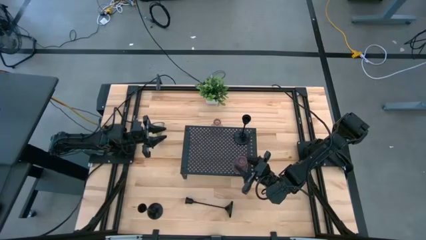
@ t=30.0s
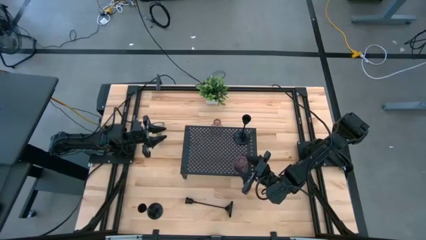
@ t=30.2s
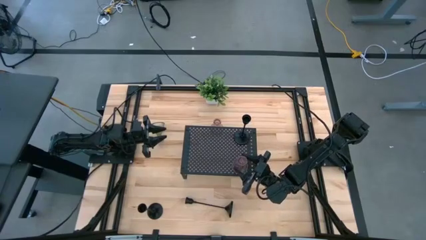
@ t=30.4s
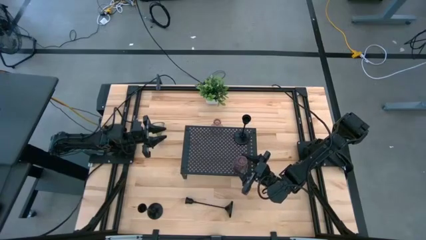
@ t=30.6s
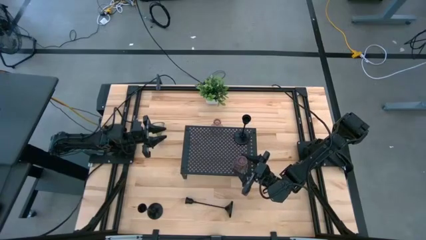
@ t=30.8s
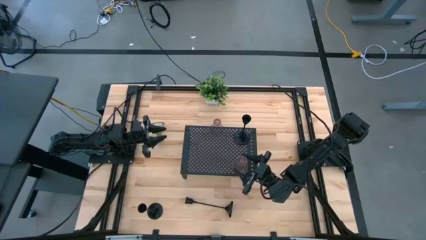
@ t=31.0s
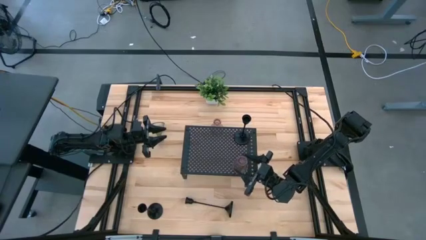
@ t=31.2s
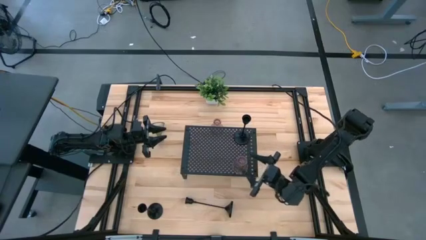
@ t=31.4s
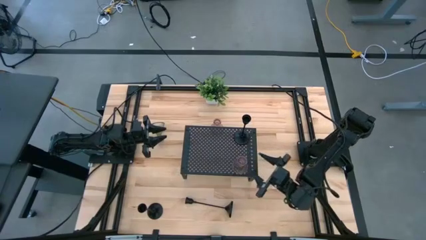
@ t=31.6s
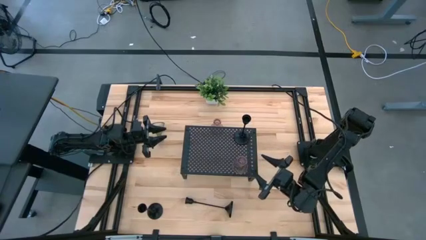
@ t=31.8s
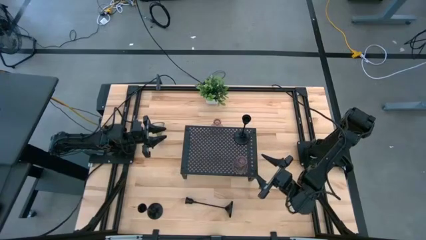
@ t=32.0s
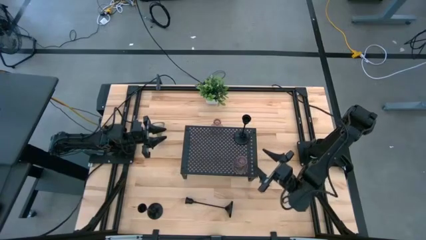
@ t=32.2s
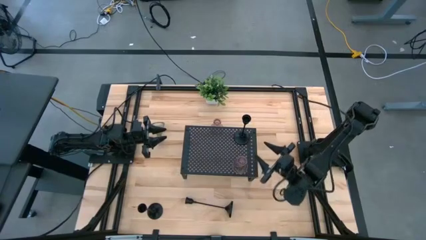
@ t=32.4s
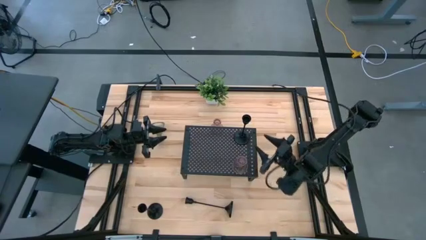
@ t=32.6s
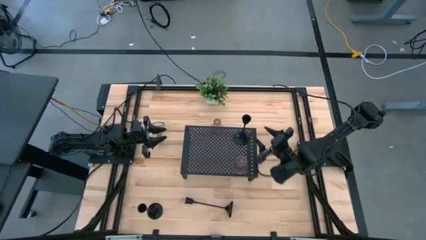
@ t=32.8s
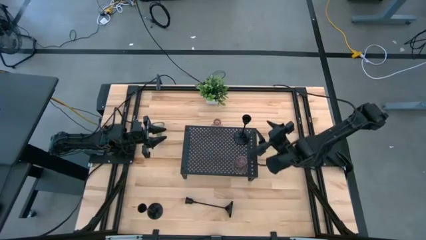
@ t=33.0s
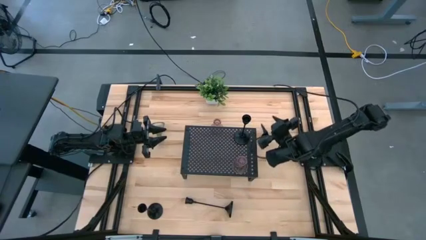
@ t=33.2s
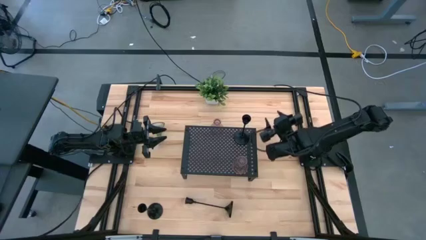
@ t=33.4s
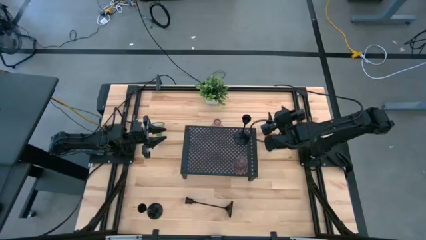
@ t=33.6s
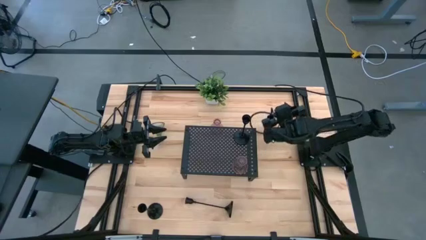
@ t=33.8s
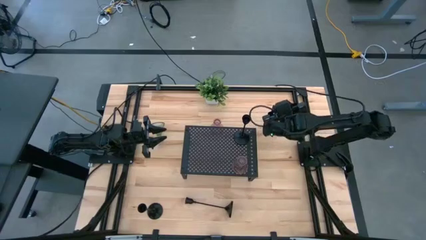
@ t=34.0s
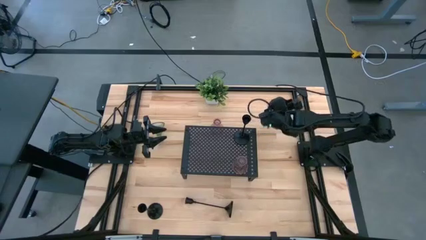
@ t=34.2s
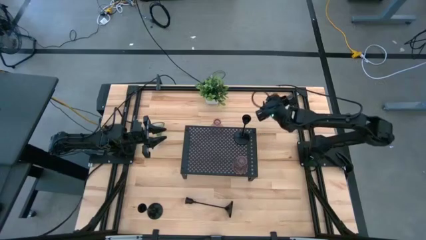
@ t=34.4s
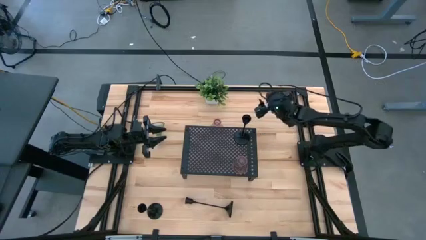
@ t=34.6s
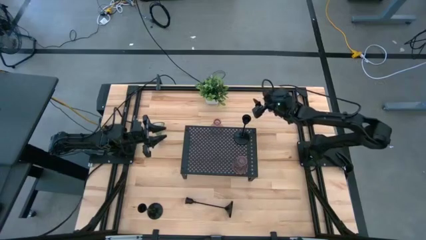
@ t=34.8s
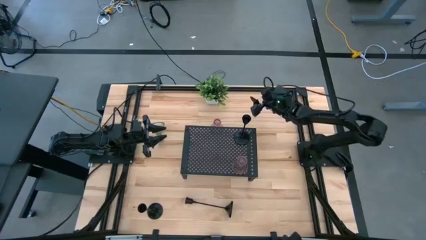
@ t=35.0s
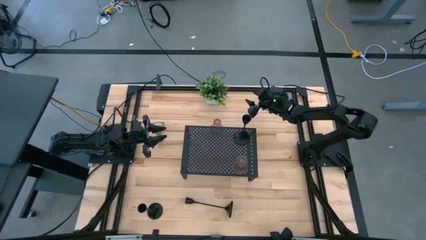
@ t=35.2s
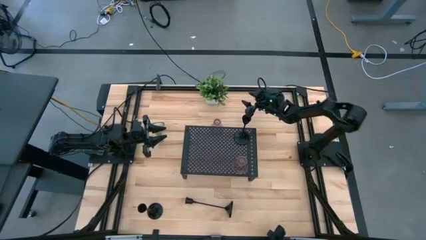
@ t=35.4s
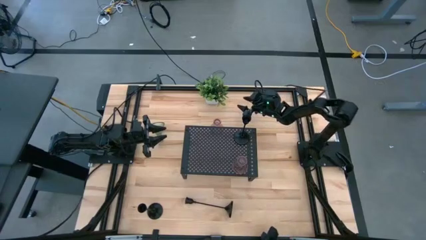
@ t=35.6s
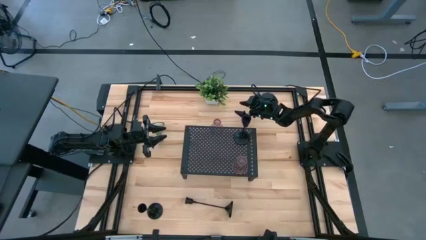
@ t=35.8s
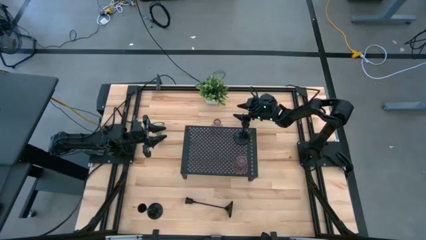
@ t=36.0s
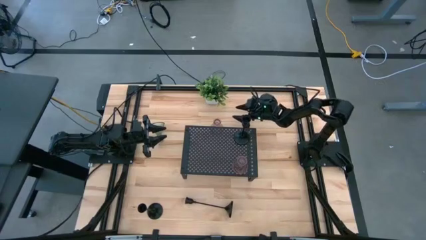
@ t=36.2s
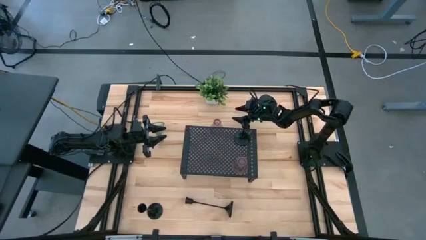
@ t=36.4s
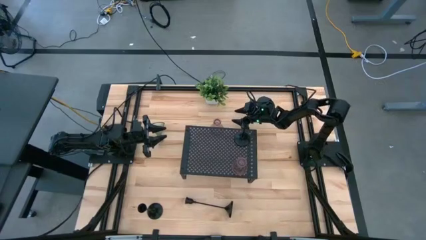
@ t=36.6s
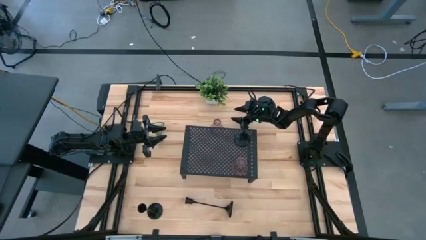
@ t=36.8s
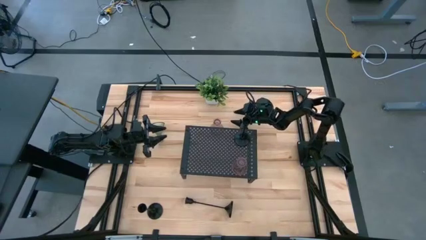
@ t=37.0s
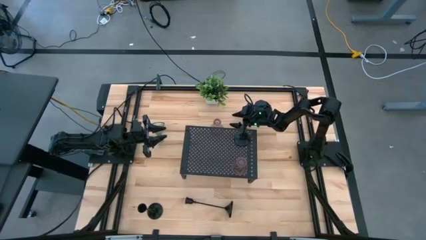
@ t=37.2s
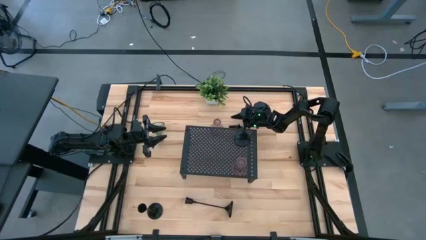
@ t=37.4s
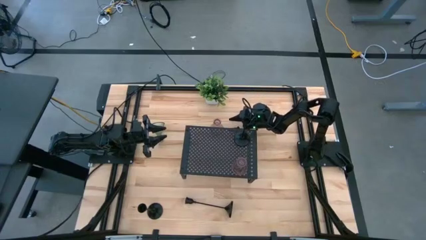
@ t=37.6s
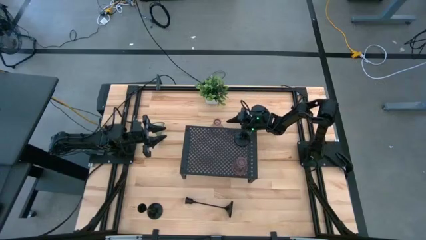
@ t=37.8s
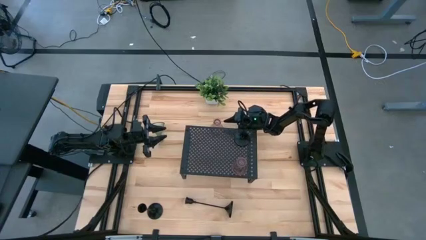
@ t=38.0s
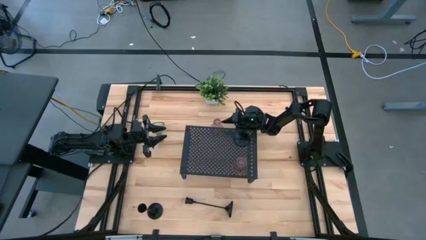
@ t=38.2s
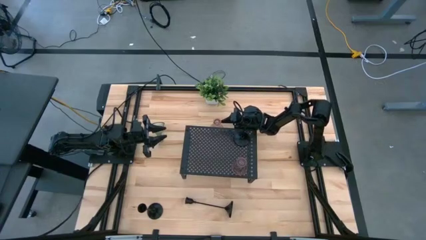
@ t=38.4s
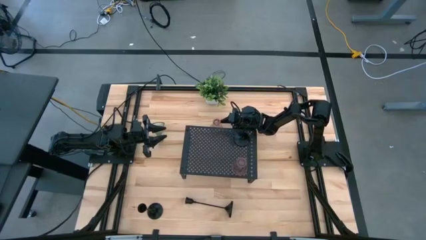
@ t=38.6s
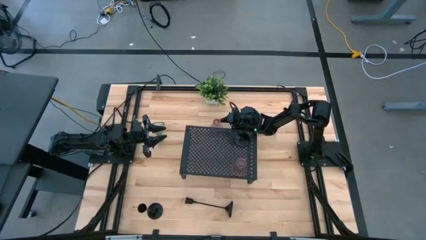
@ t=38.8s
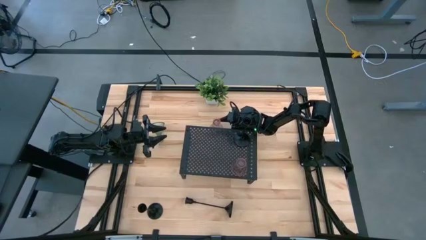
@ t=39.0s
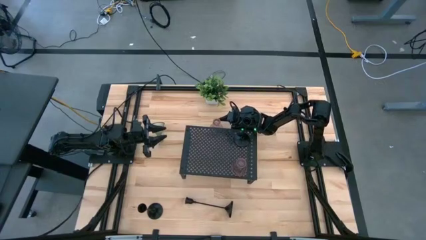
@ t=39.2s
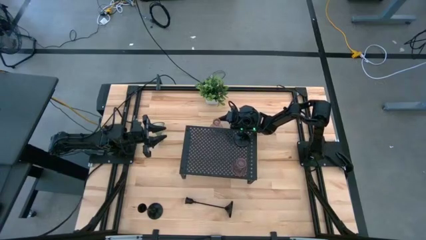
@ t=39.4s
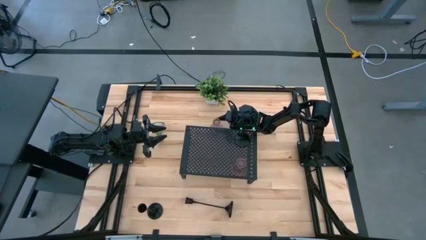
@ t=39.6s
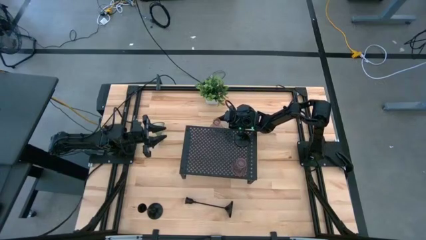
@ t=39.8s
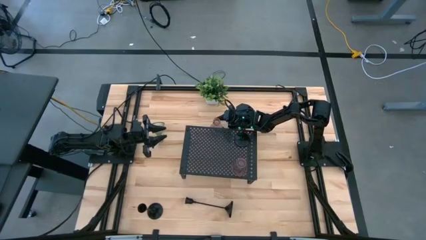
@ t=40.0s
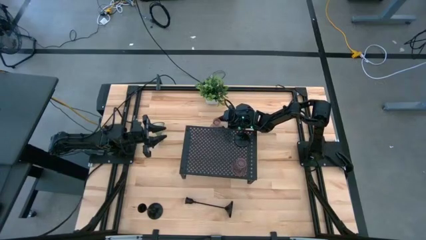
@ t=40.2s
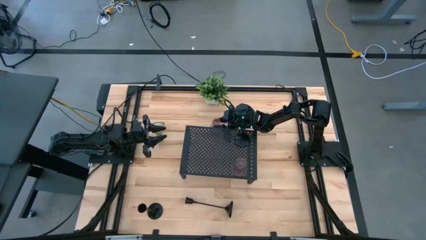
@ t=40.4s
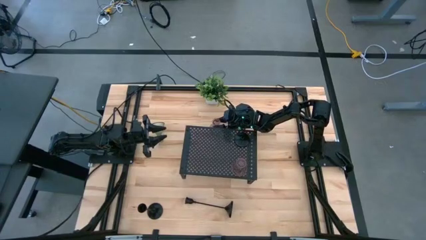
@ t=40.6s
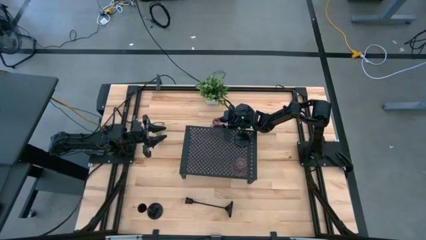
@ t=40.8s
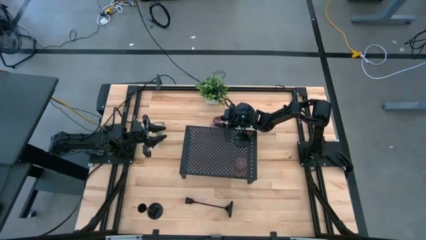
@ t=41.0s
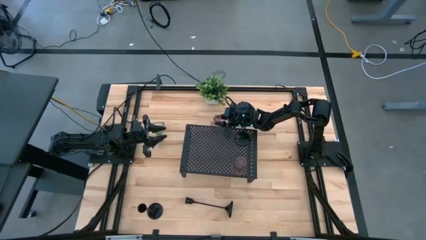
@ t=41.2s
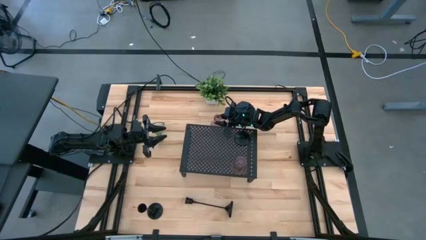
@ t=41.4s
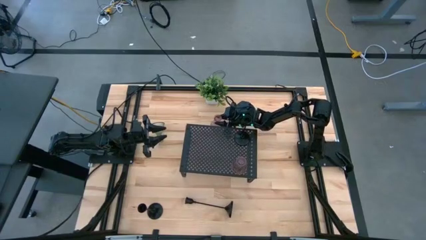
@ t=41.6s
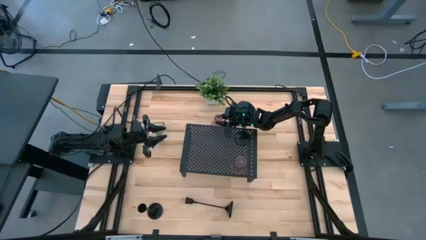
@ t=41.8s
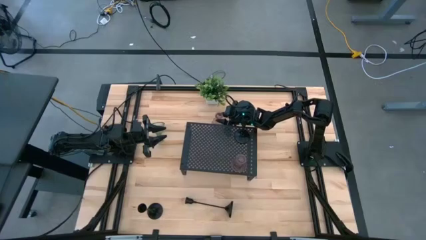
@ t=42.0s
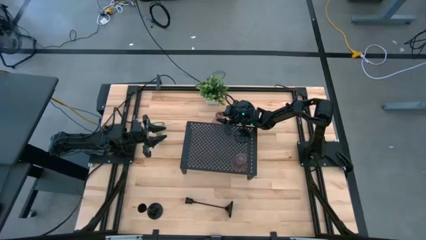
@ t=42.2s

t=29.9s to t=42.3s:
Task: Pick & Place candle stick holders
Put the pink glass candle holder on the shelf
